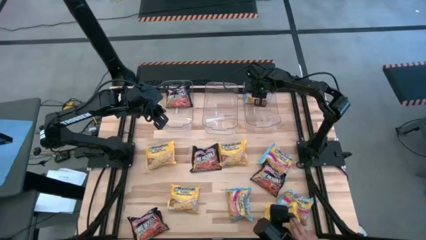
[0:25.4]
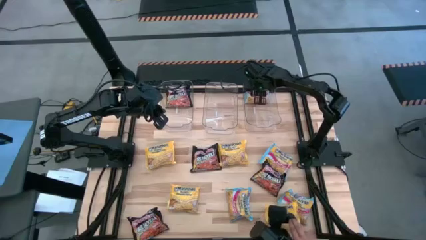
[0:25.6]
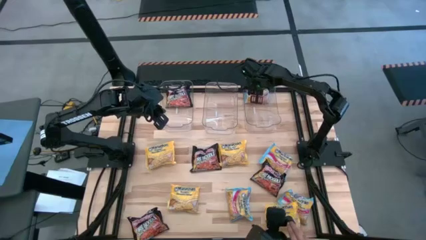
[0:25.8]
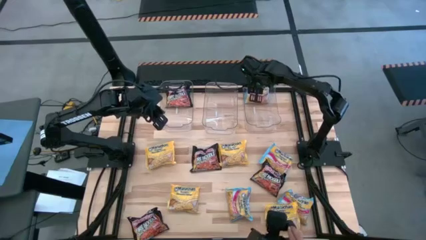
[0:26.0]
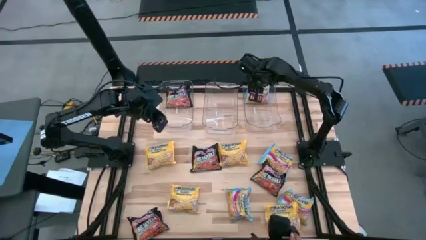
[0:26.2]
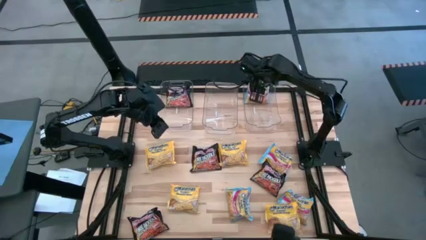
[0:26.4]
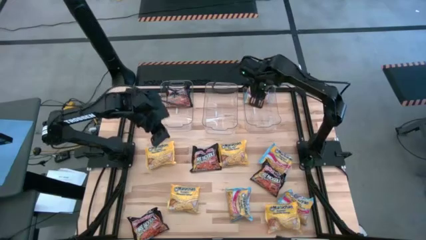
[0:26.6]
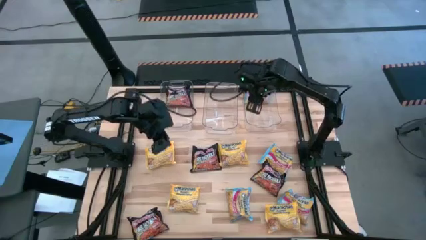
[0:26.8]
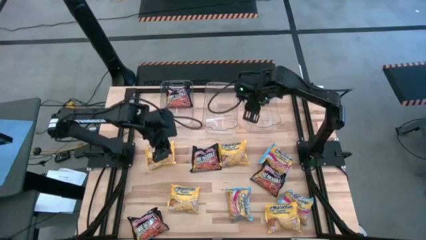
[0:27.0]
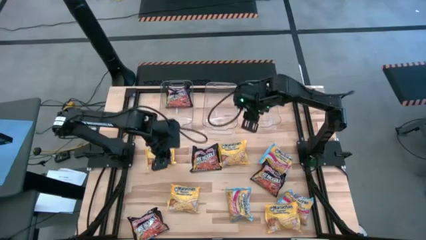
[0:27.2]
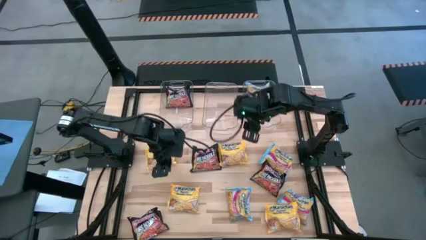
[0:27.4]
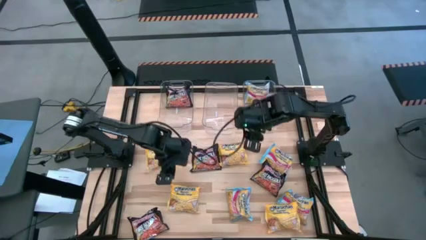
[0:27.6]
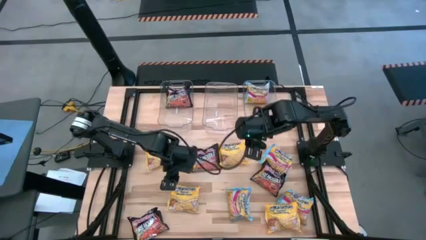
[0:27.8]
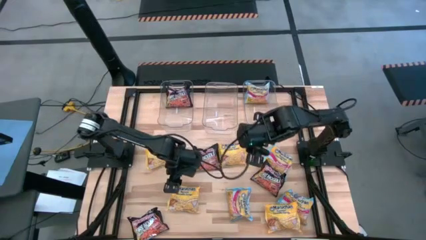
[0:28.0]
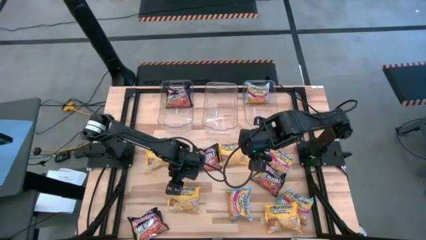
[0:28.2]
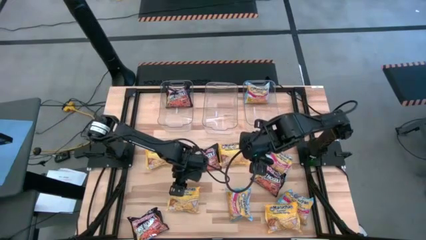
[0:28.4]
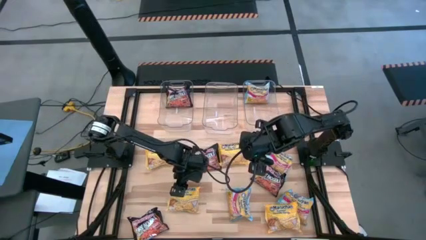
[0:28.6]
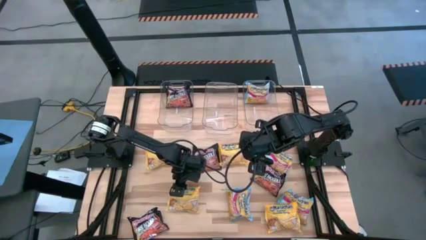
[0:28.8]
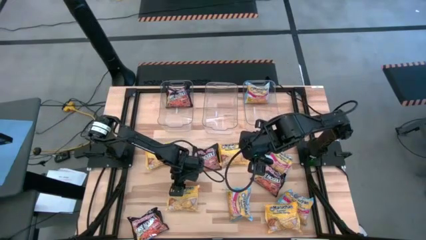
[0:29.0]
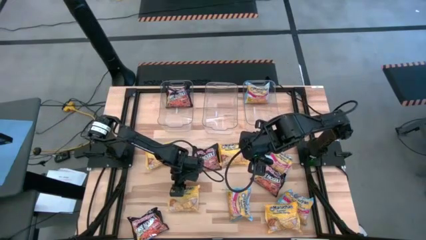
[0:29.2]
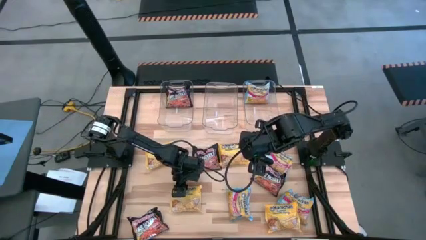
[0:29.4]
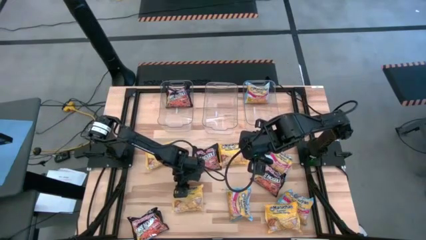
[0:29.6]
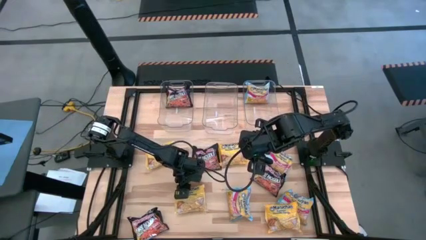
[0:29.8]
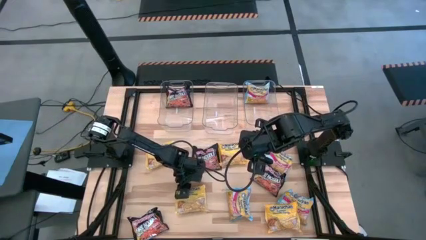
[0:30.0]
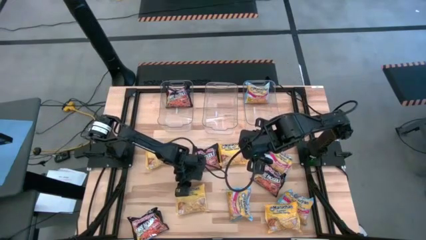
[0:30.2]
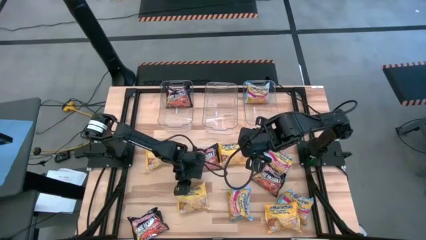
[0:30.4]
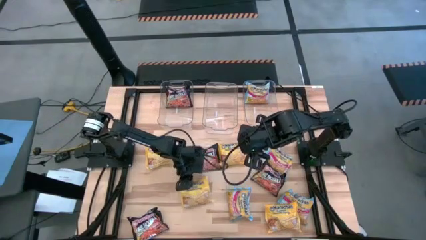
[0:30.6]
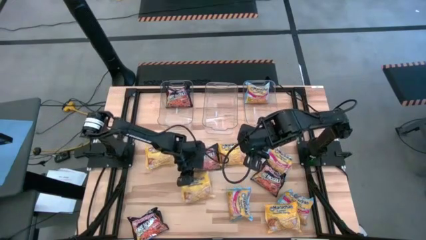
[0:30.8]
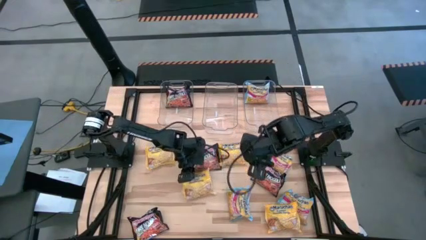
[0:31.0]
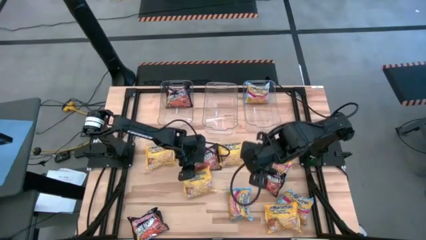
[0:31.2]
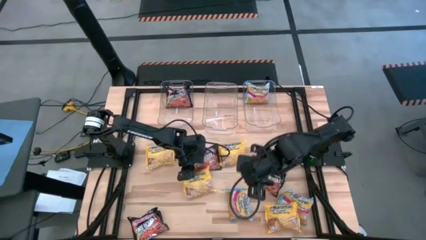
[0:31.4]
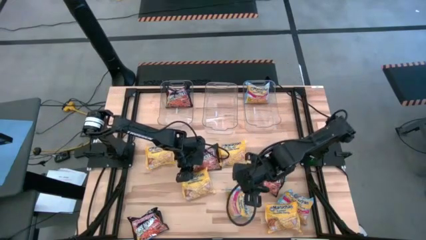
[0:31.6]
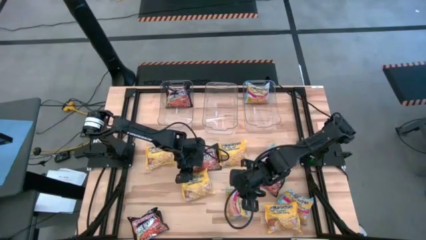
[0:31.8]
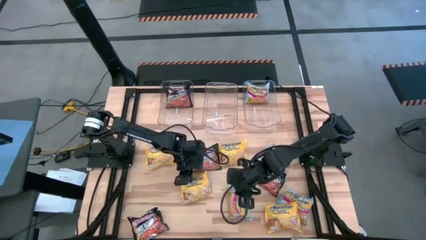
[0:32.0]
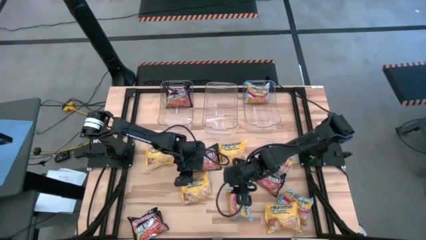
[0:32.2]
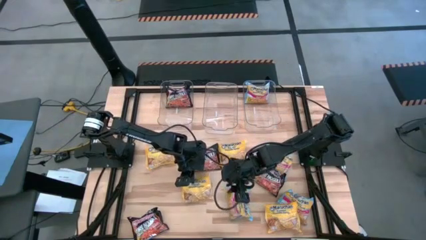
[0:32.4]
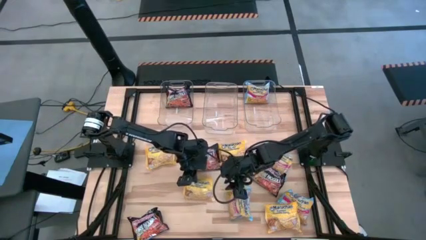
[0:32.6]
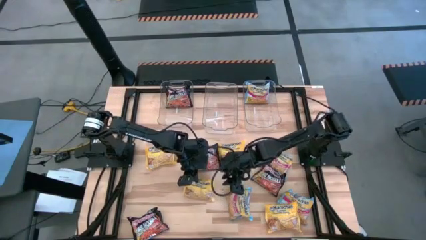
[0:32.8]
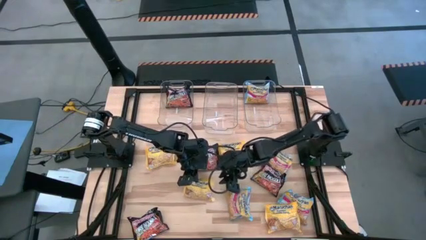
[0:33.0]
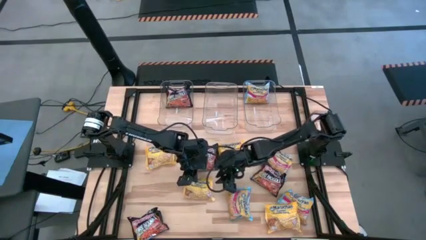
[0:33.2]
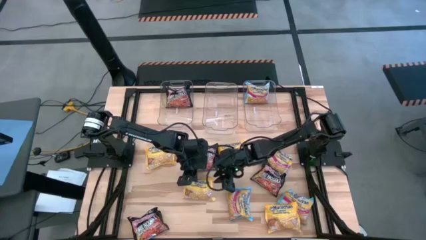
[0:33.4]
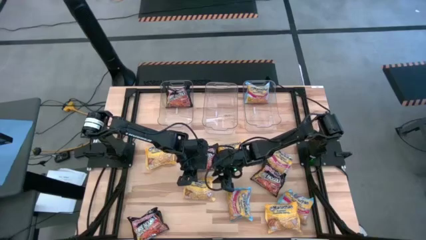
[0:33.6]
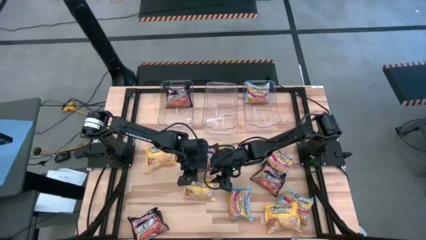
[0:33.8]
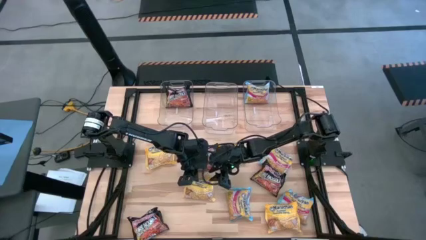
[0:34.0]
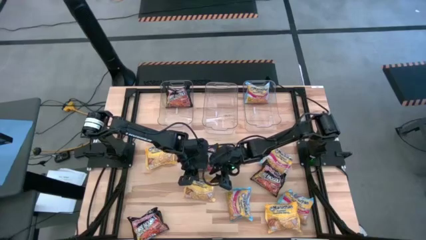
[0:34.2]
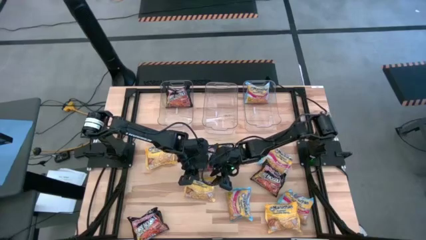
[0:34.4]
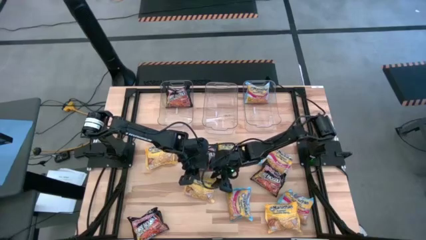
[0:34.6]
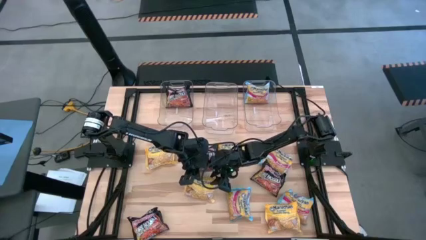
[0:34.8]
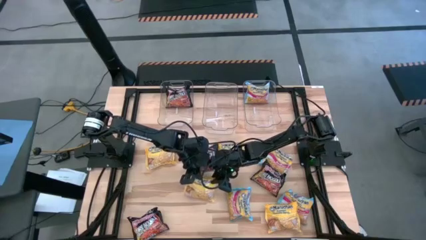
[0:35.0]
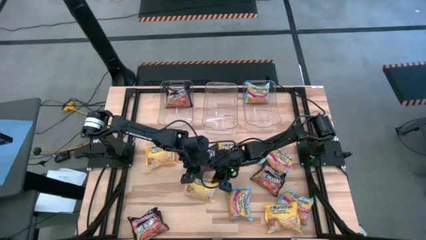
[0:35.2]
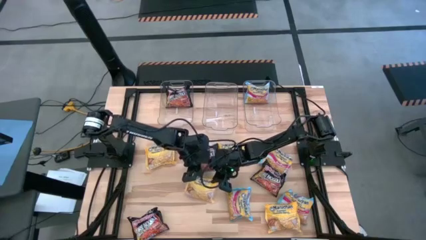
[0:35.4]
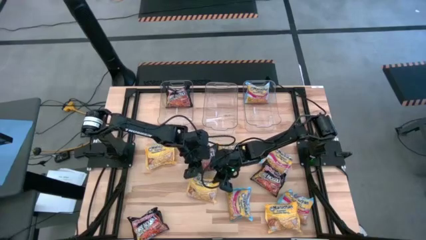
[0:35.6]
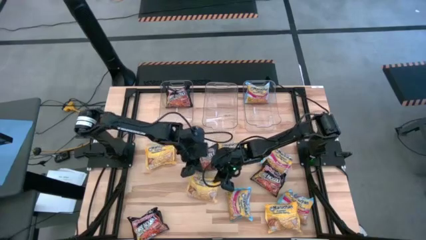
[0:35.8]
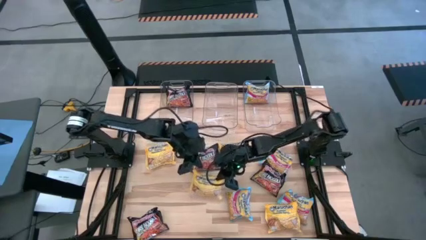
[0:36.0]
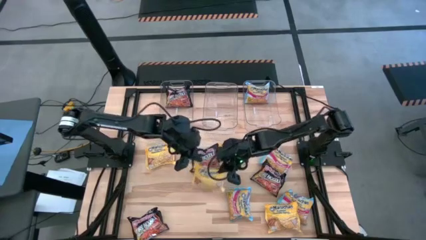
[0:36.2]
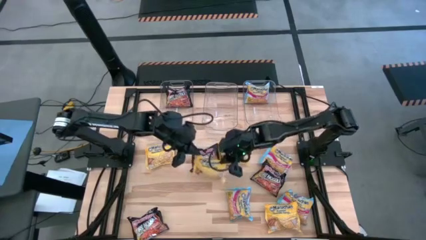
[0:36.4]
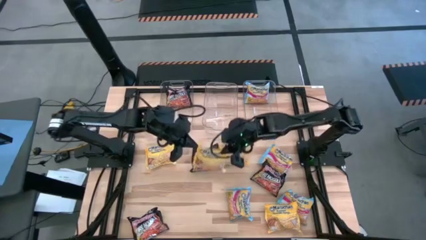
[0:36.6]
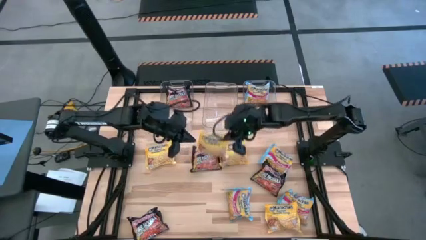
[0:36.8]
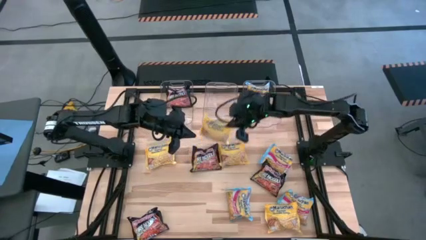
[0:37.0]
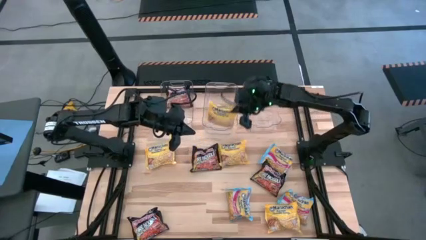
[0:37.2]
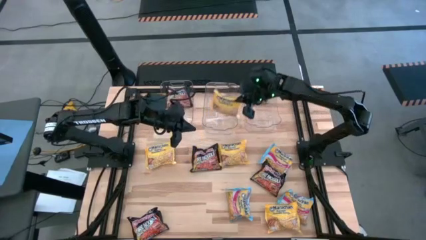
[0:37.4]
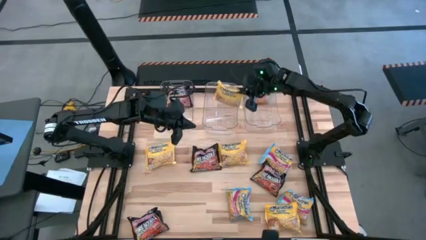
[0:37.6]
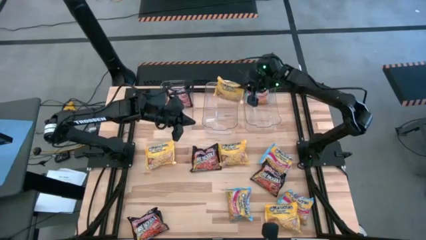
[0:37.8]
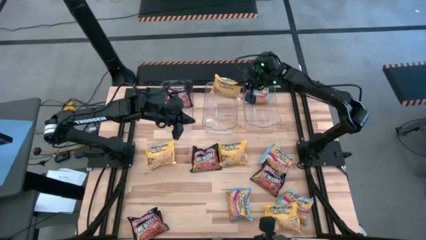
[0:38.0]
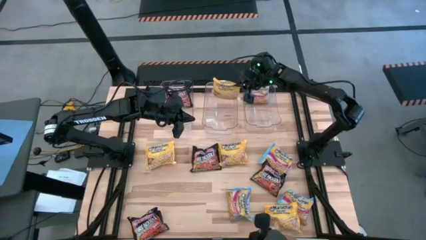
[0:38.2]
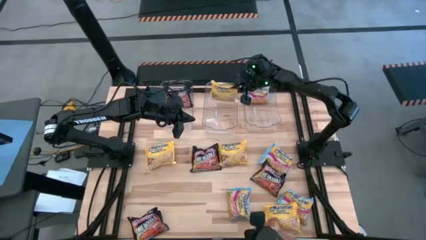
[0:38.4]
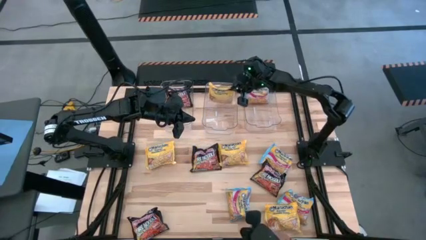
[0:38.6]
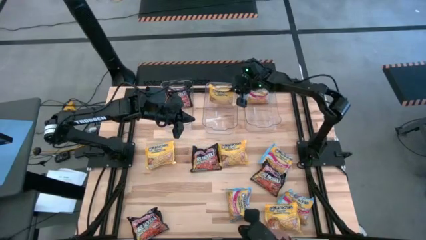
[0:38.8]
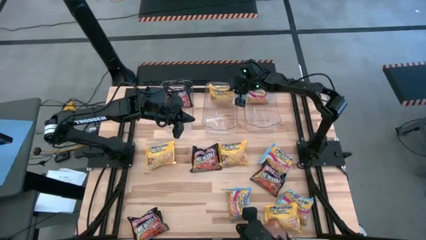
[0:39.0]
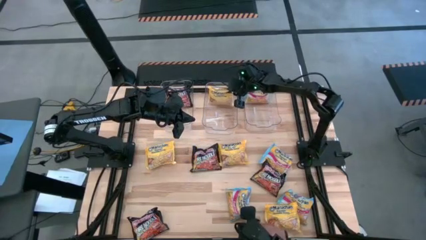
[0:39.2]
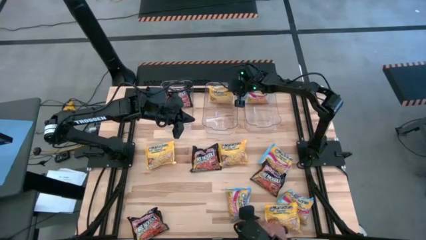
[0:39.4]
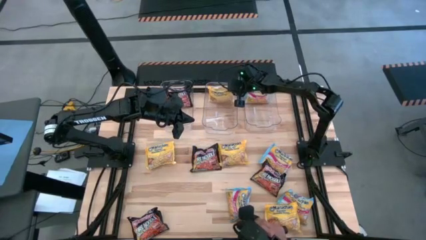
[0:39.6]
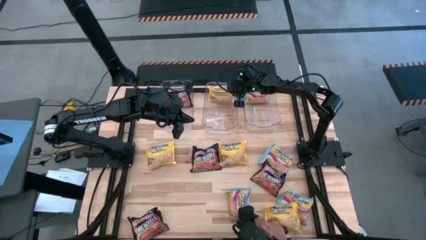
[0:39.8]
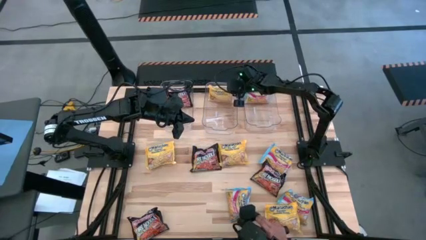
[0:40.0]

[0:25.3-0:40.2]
Task: Sort Maruchan noodles
Put the yellow noodle pack into the middle transparent bin

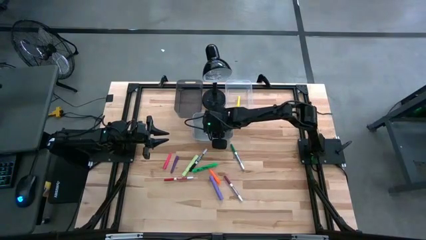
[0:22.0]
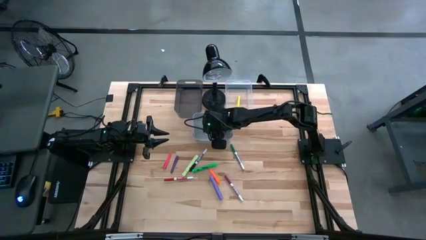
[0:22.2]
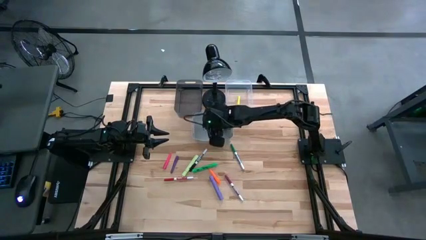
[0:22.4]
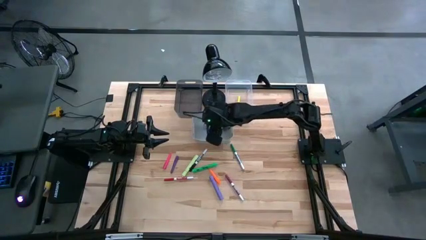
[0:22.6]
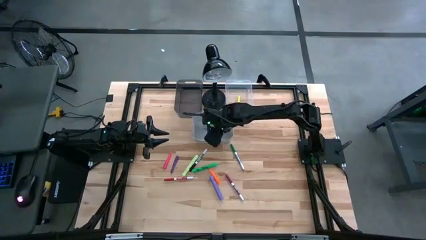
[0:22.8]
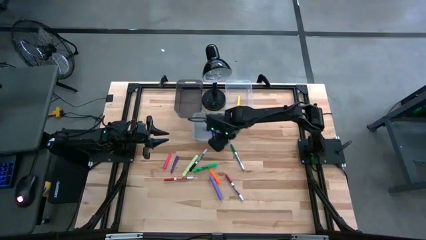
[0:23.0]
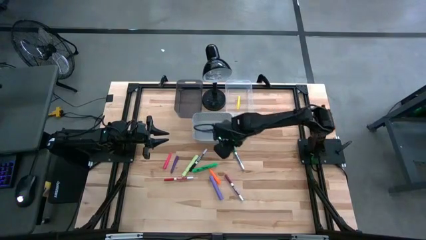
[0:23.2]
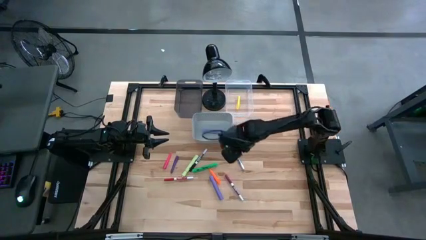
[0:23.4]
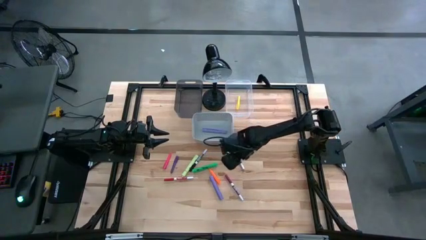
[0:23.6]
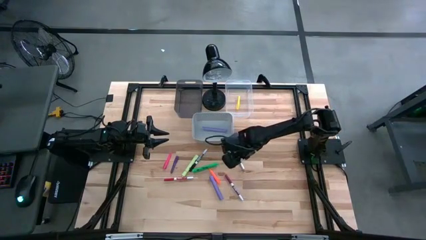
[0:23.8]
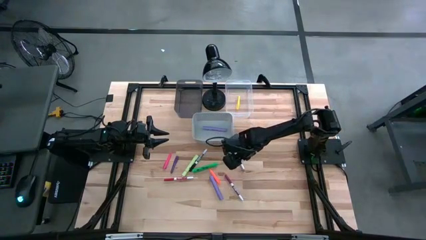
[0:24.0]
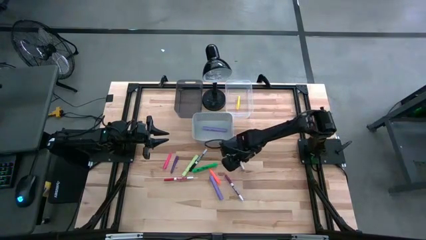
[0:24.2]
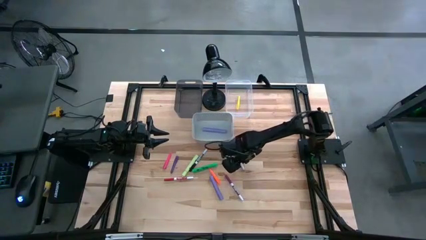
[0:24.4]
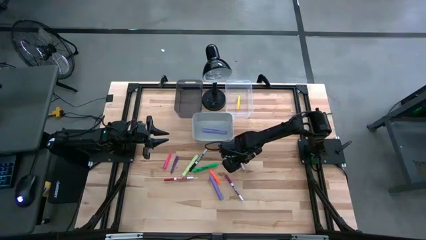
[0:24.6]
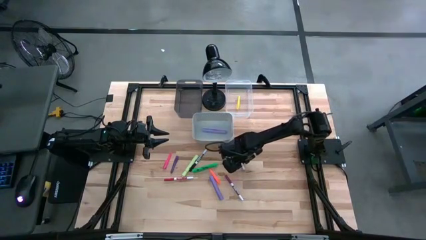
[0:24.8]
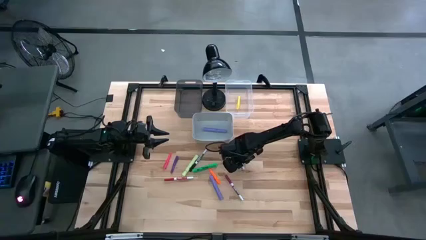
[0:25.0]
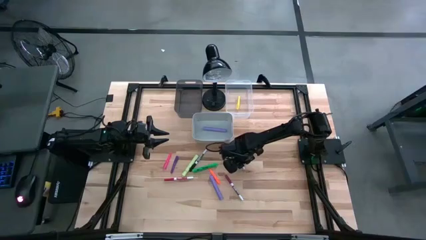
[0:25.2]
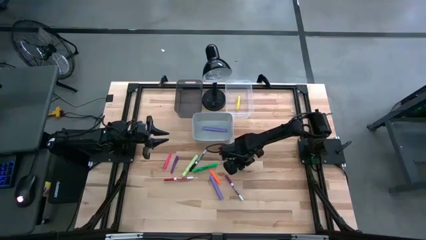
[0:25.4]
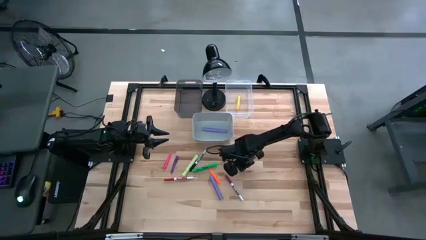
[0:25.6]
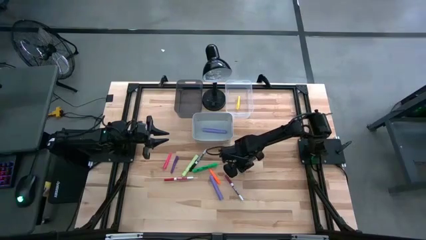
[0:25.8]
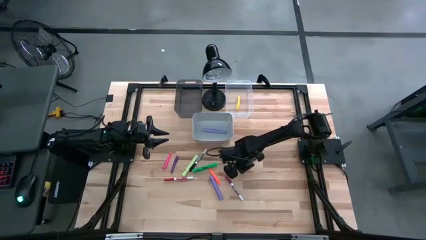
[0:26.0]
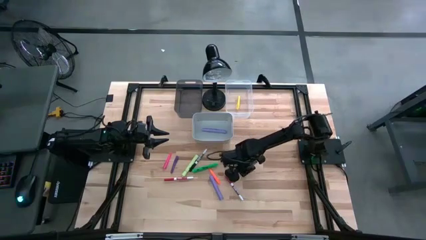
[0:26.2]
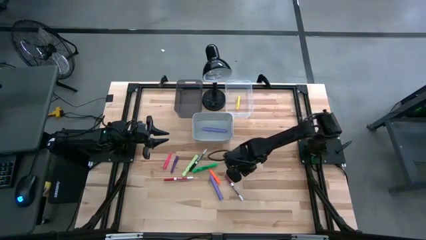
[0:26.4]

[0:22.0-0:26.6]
Task: Pick & Place Markers
Put the medium green marker into the black bin
